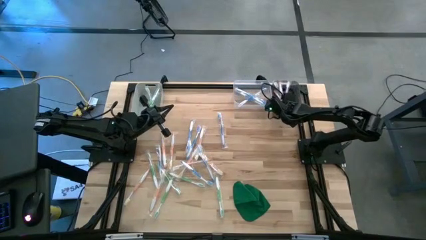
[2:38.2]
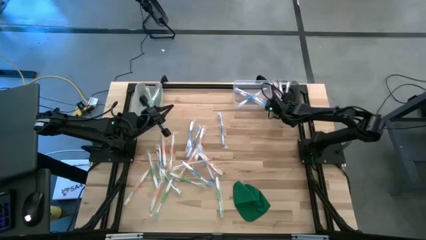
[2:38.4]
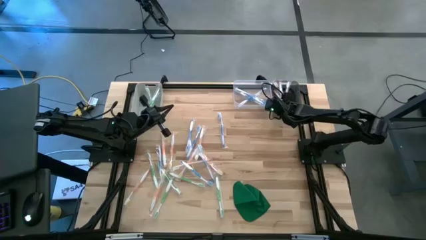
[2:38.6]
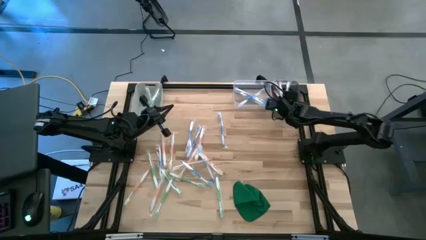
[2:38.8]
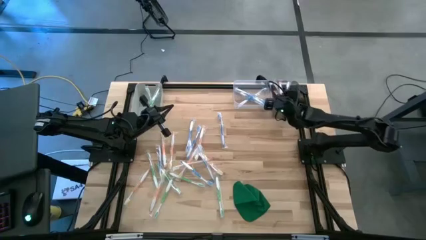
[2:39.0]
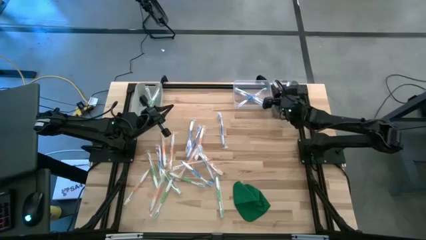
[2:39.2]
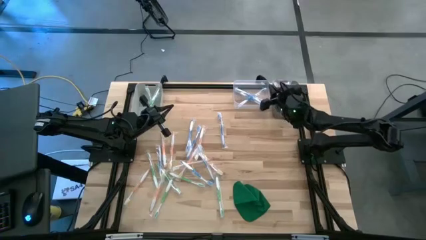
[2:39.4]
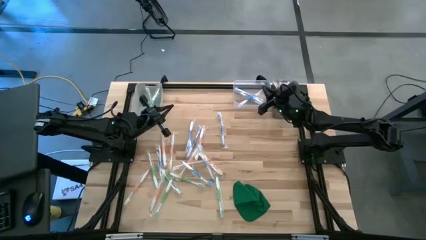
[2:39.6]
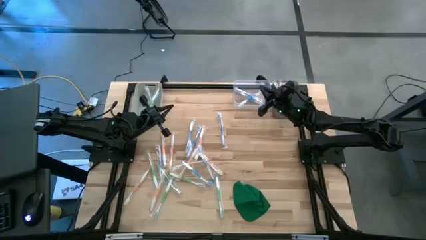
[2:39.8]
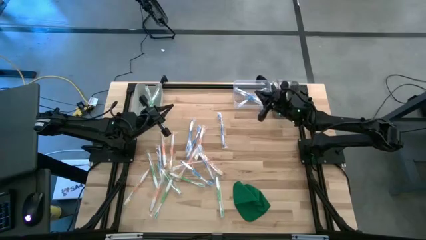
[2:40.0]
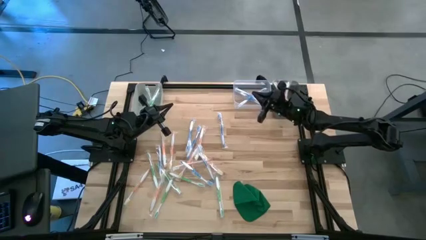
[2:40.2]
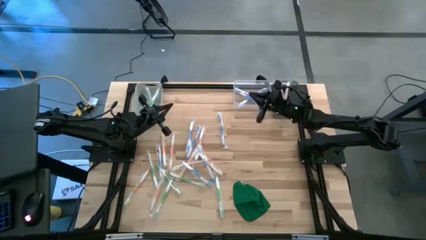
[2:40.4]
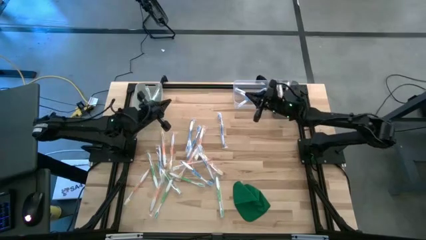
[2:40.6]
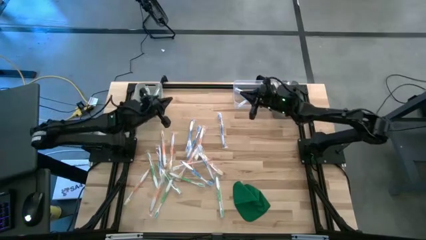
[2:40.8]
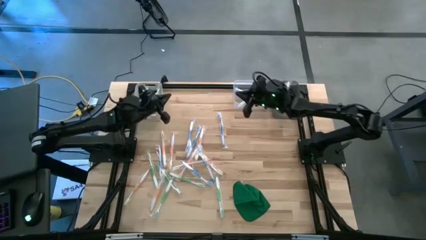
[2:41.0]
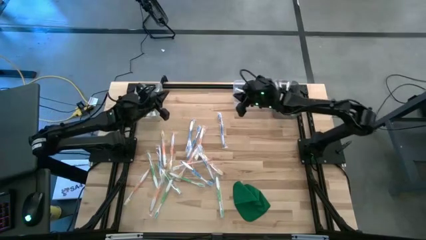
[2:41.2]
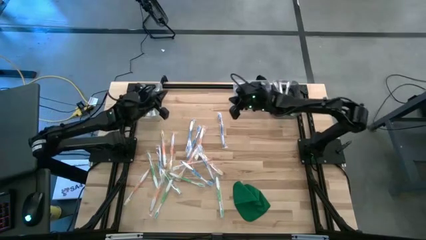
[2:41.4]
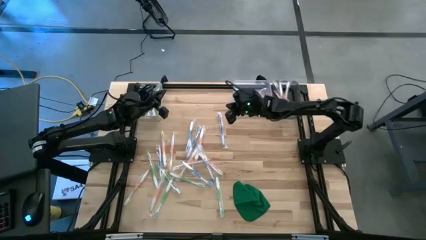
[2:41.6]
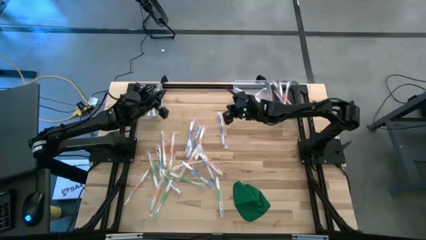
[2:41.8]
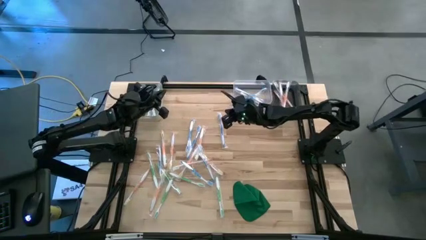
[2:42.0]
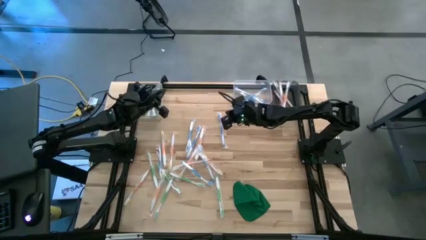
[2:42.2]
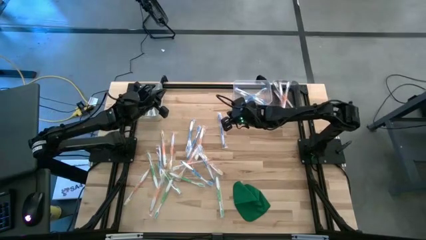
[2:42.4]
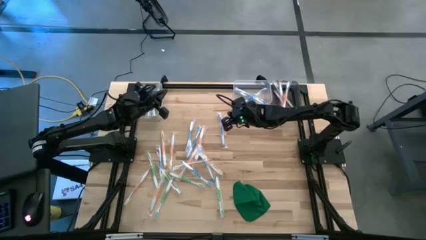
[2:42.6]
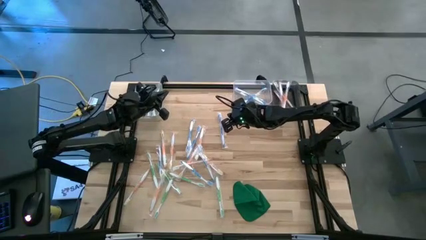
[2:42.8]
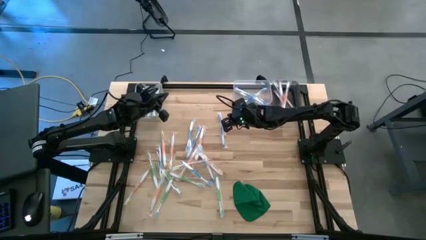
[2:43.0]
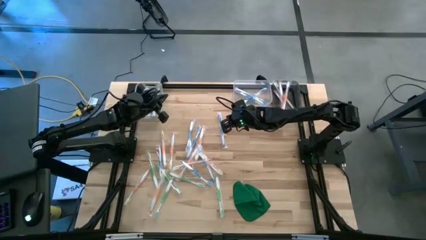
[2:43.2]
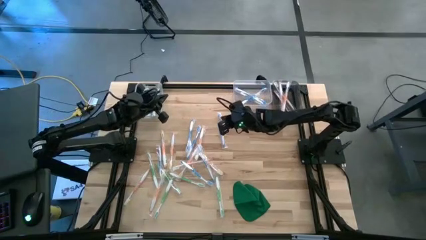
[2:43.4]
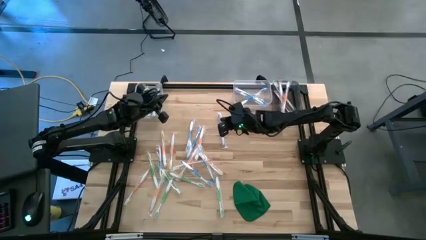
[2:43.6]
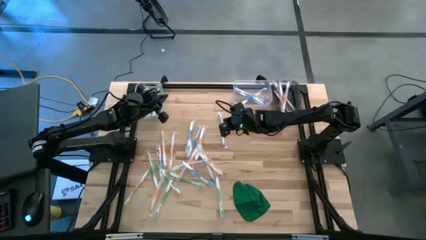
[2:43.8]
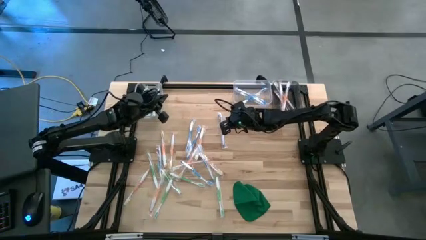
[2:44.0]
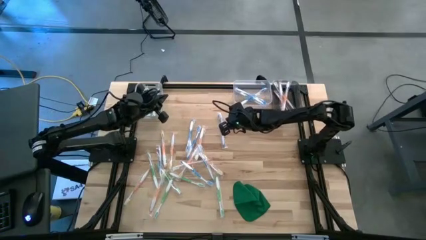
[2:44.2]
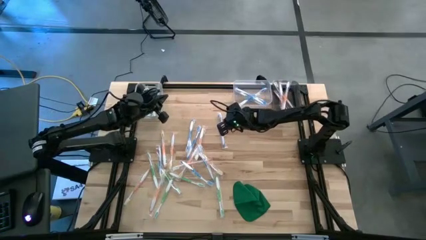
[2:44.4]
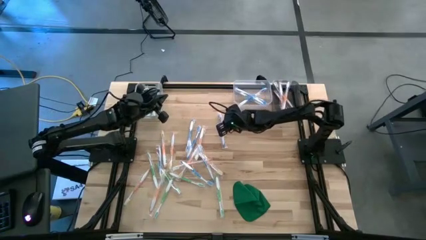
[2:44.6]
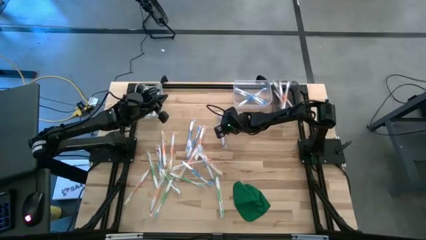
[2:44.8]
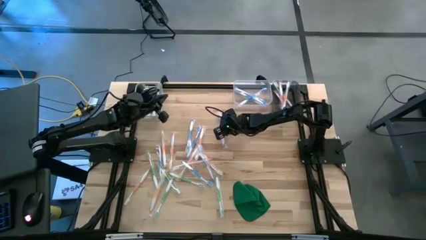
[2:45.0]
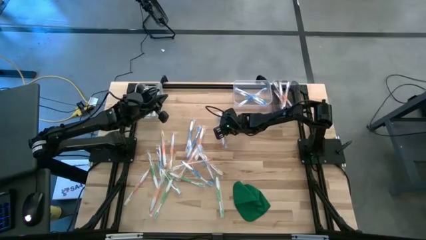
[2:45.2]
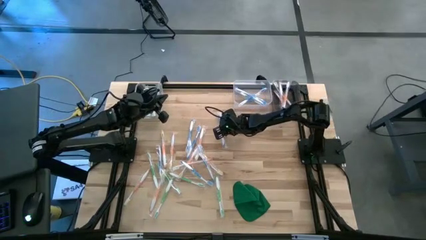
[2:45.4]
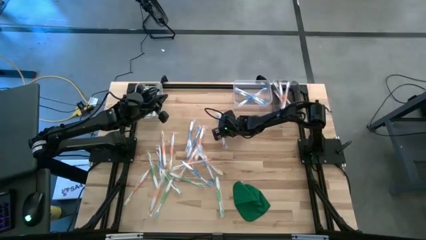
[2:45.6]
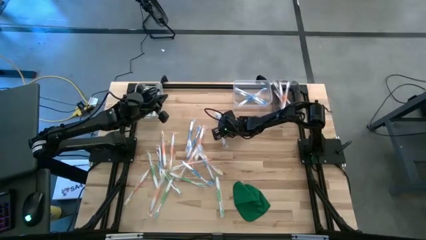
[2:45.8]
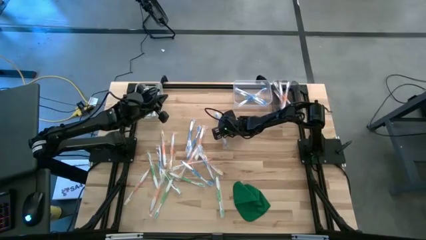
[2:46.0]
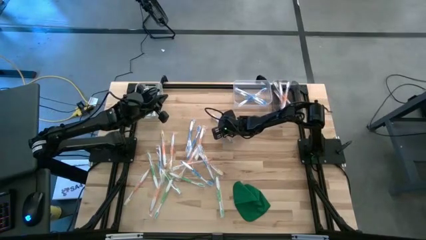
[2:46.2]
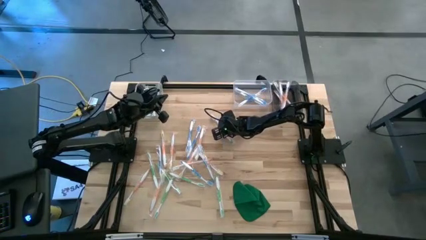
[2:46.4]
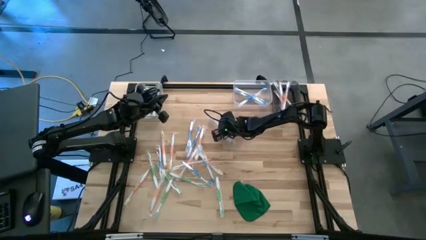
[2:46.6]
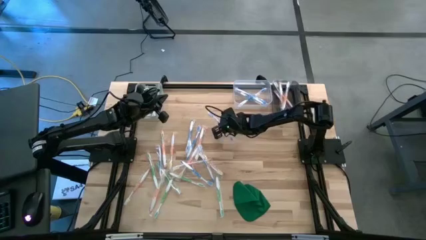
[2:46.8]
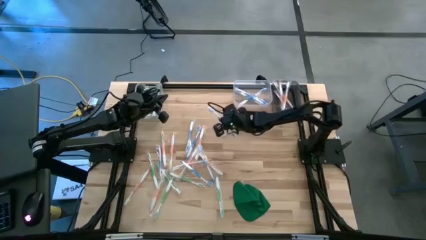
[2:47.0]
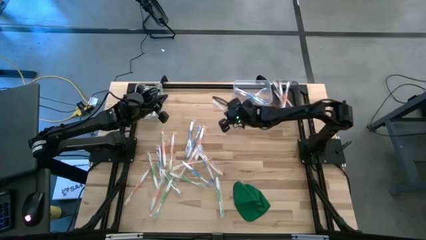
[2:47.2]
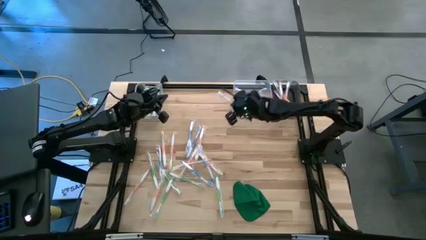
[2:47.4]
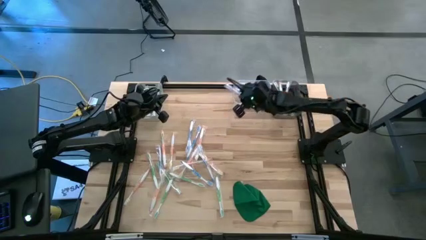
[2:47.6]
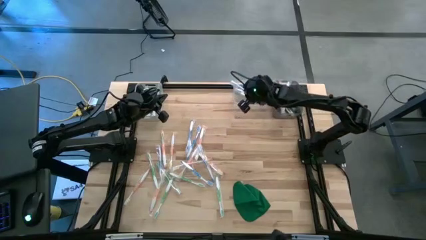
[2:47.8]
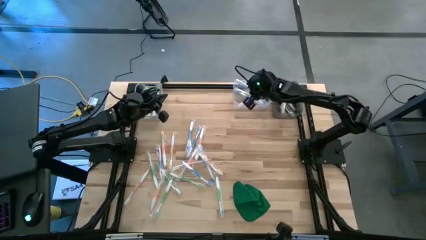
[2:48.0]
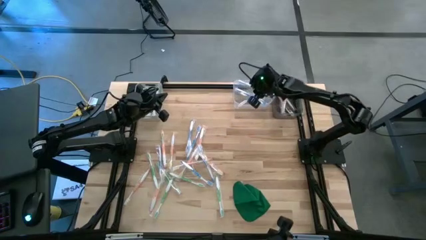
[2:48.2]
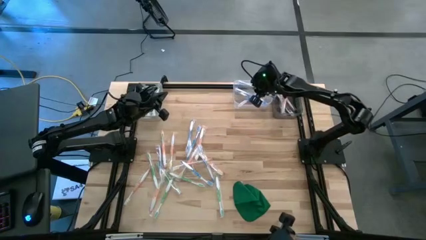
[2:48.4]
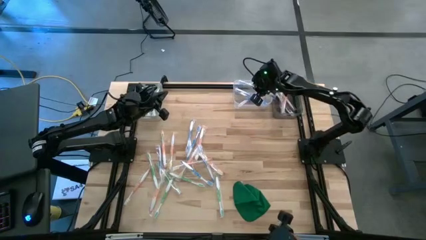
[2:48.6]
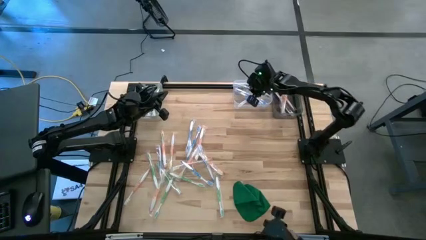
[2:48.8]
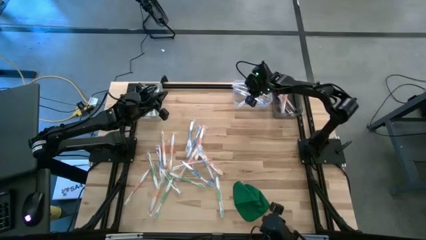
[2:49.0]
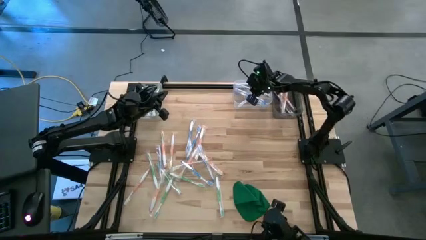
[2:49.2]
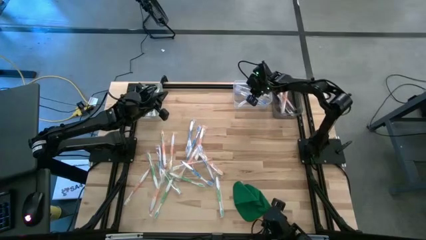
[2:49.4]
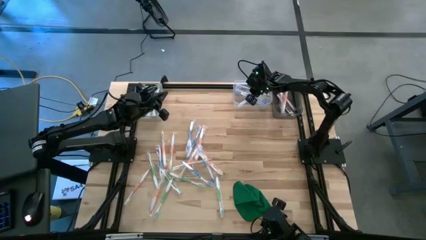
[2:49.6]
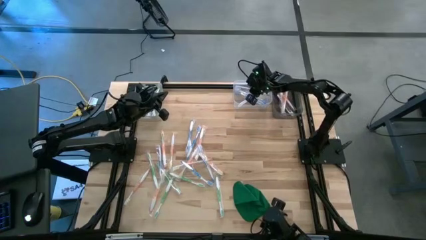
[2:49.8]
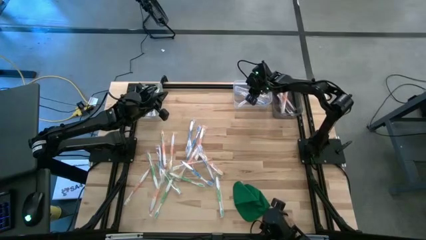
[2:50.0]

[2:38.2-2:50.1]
Task: Pick & Place Toothbrushes
Put the blue toothbrush into the transparent bin
